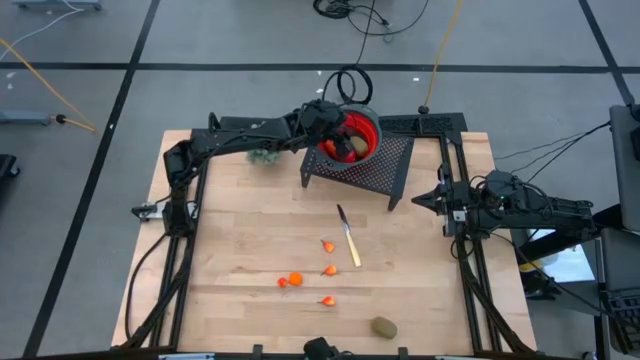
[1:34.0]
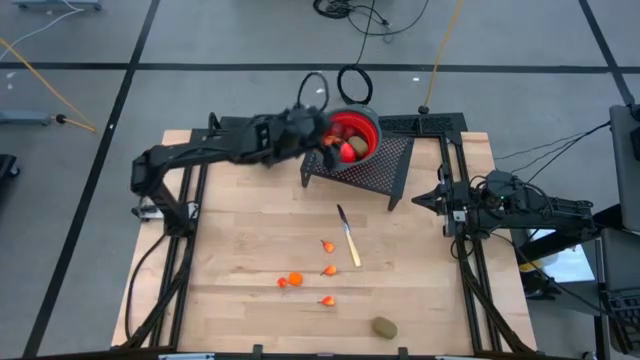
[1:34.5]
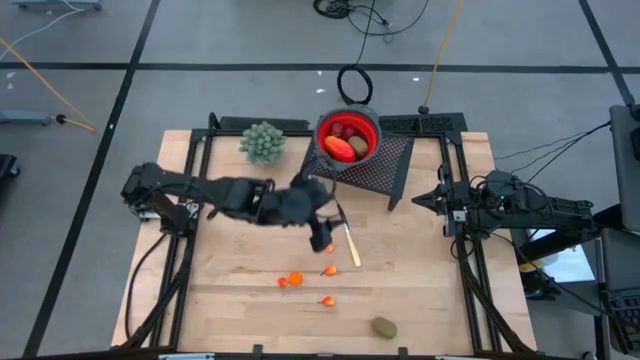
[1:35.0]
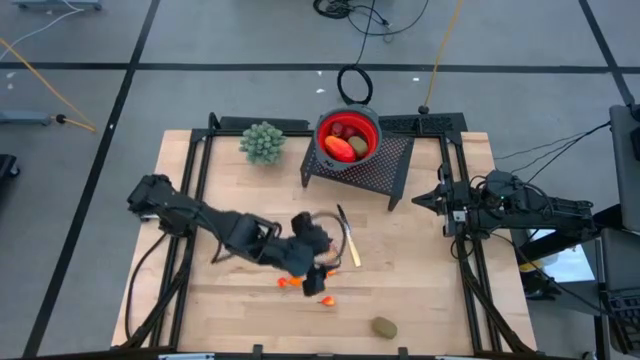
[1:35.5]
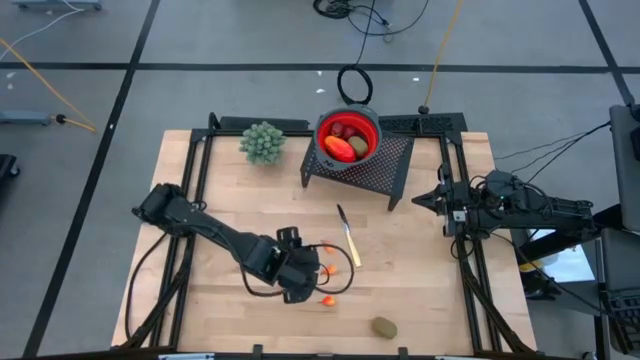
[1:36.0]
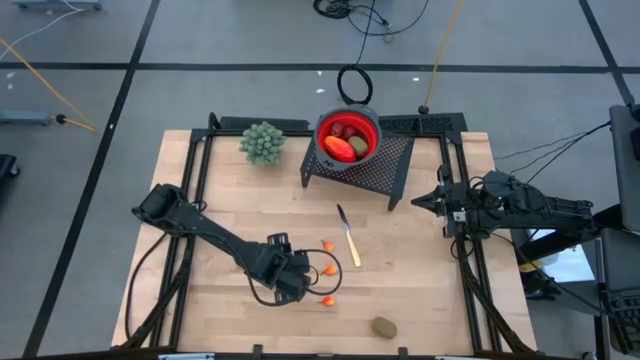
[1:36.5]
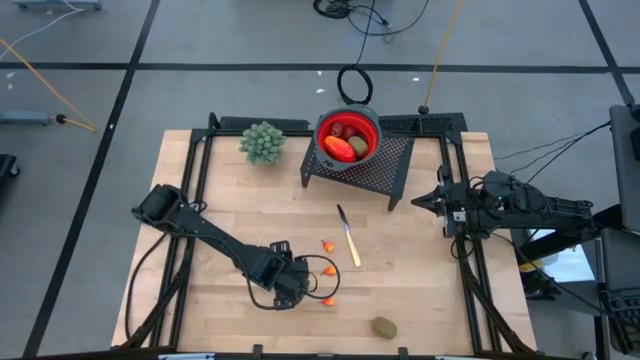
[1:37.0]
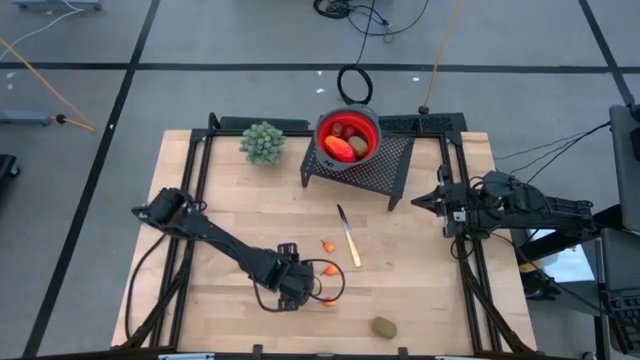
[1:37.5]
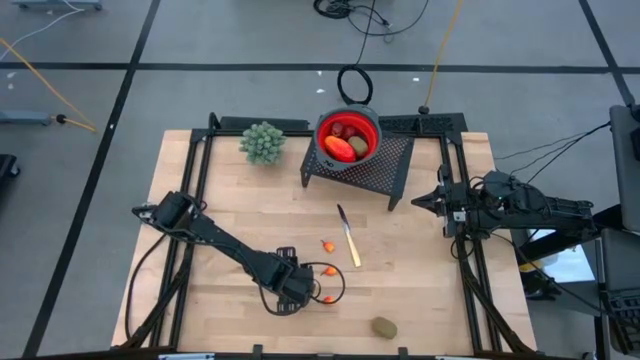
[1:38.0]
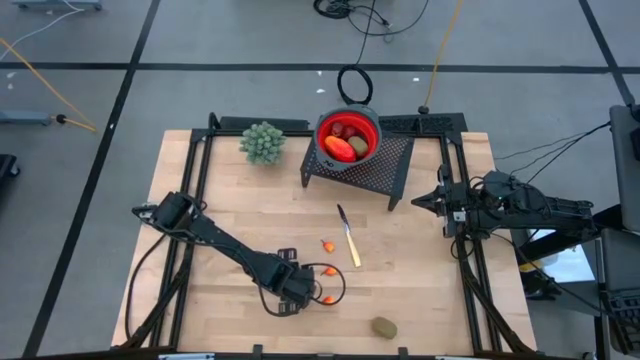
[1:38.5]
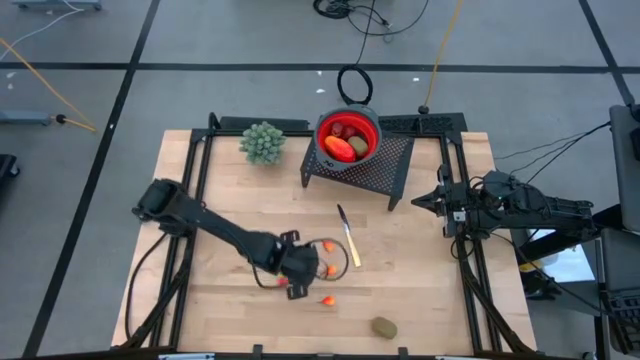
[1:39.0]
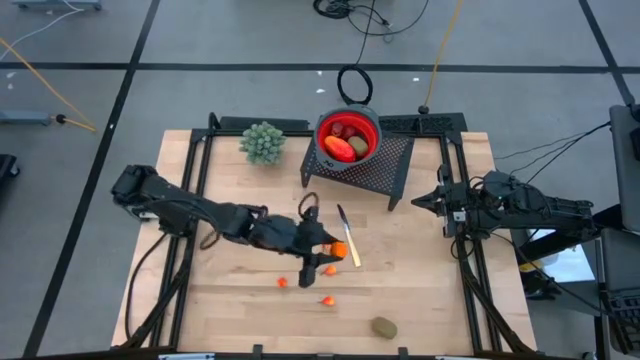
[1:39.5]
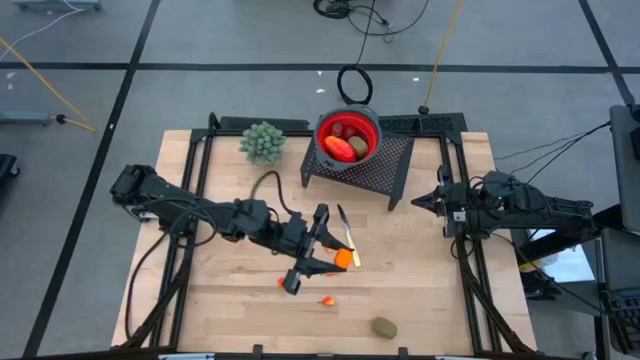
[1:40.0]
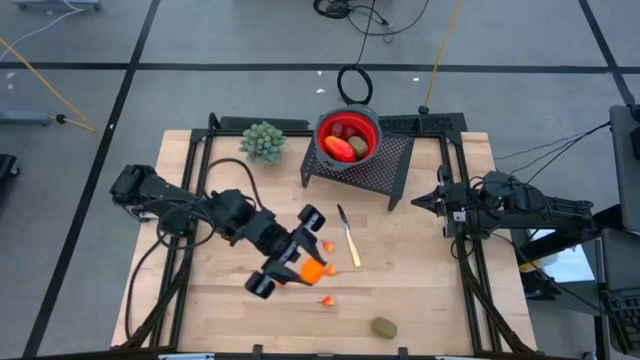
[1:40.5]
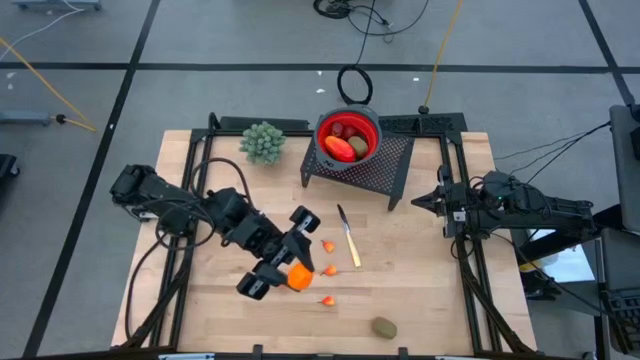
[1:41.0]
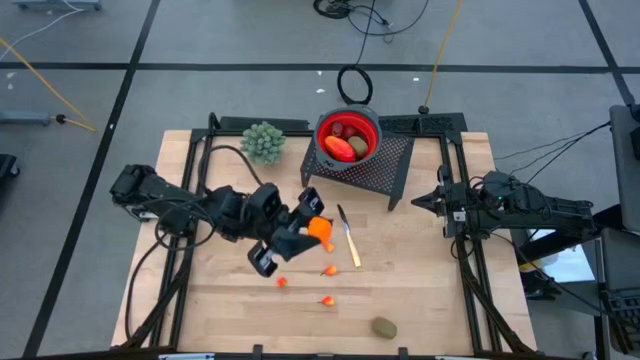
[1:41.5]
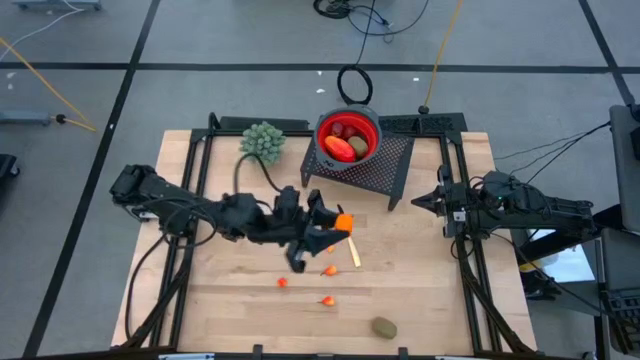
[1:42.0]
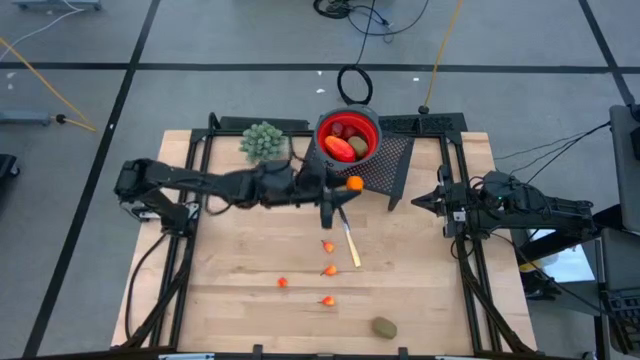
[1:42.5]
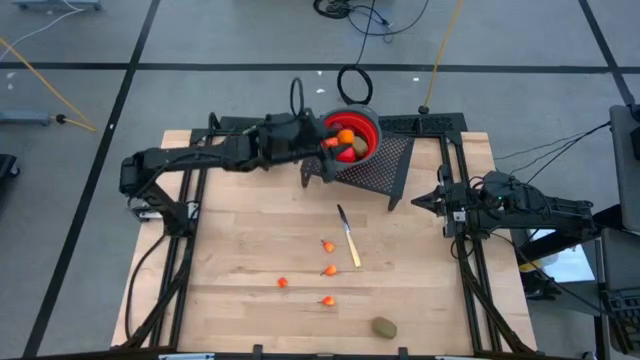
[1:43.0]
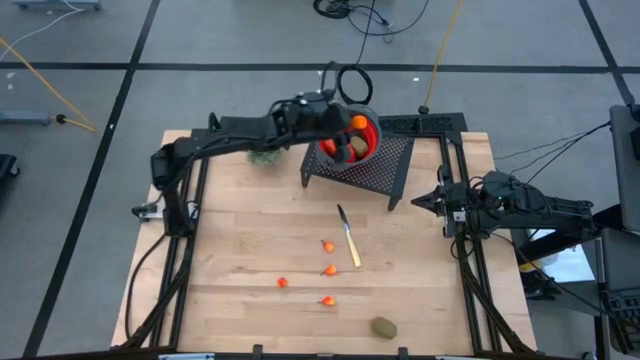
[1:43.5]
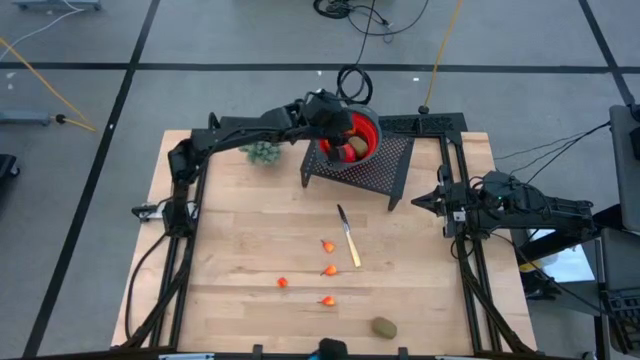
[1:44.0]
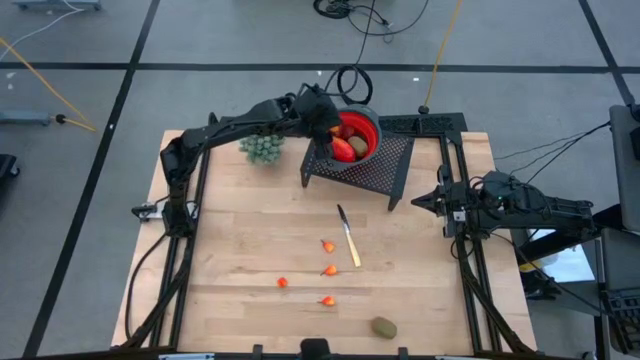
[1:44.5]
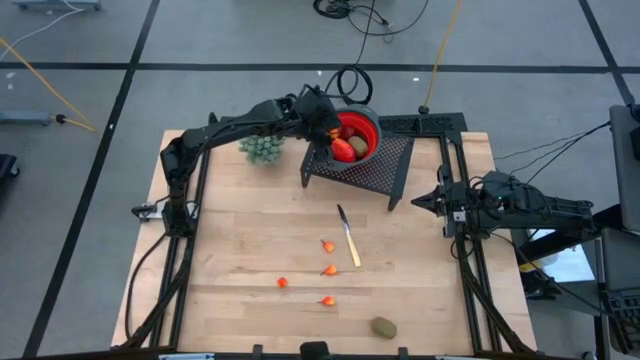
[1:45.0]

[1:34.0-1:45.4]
Task: Pick & Place Fruit
Put the orange into the red strainer bowl on the shelf

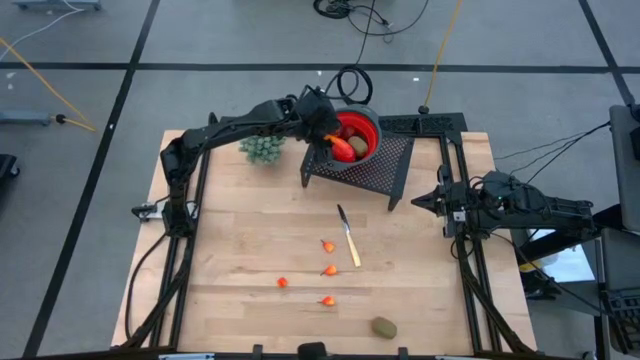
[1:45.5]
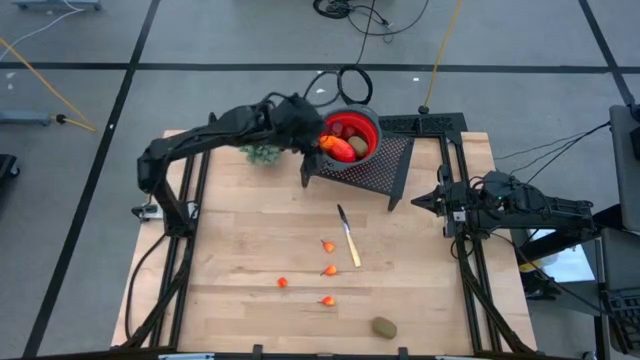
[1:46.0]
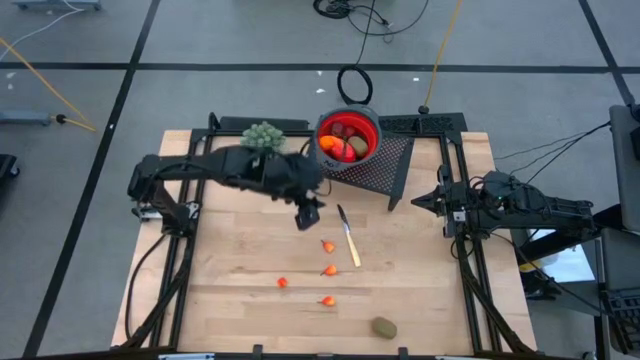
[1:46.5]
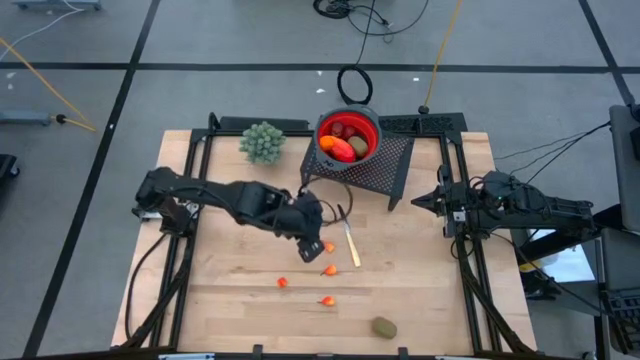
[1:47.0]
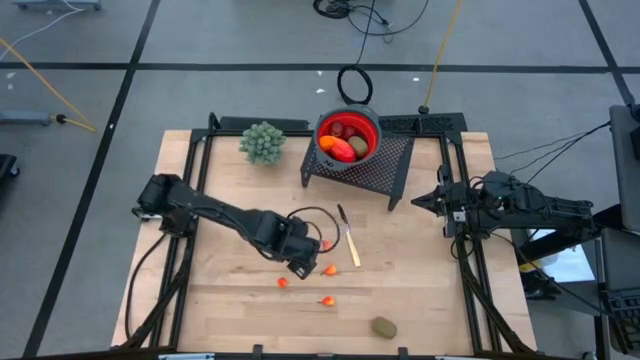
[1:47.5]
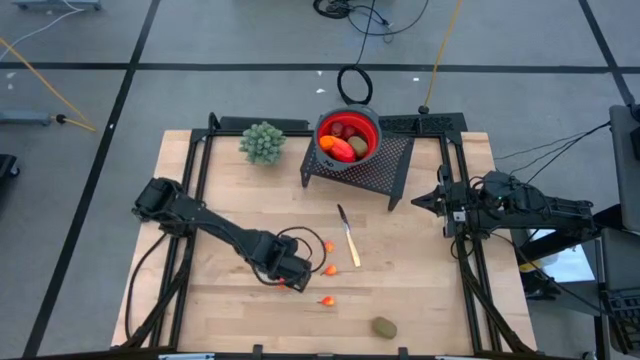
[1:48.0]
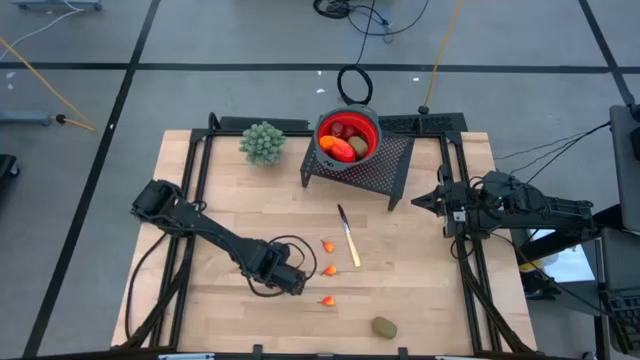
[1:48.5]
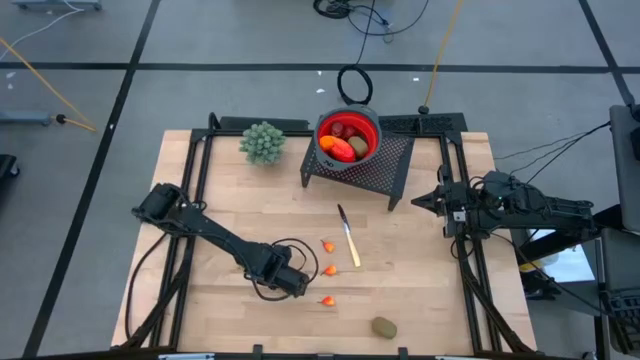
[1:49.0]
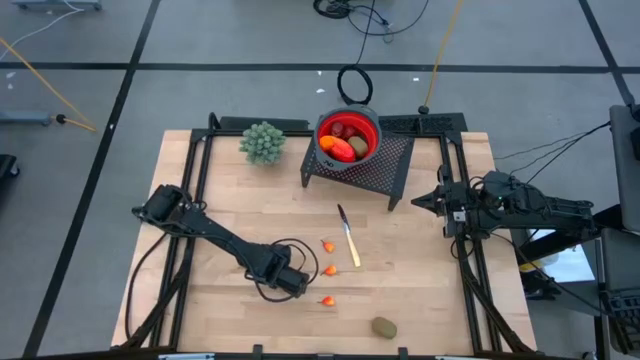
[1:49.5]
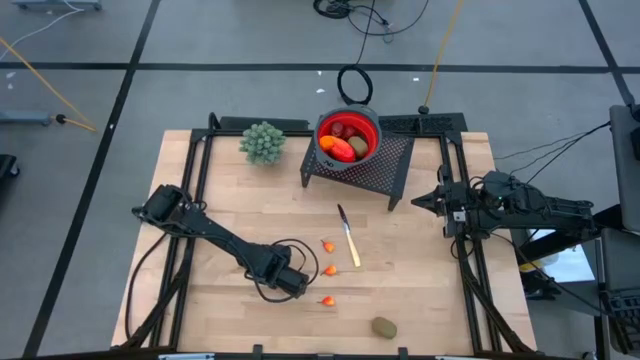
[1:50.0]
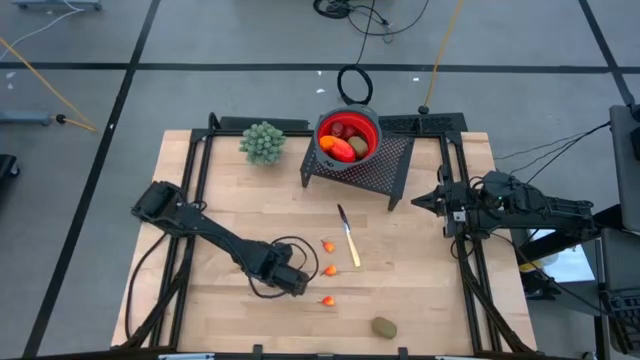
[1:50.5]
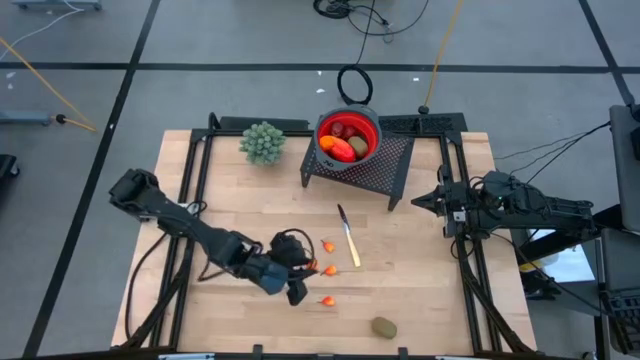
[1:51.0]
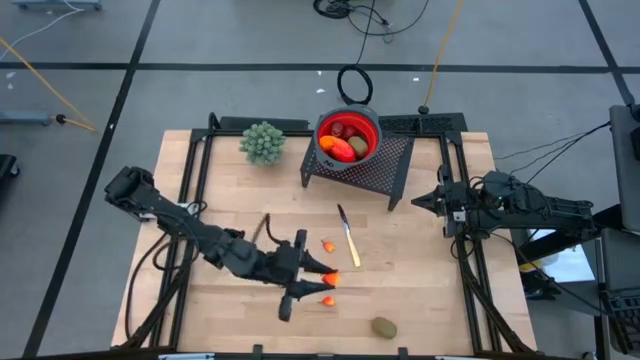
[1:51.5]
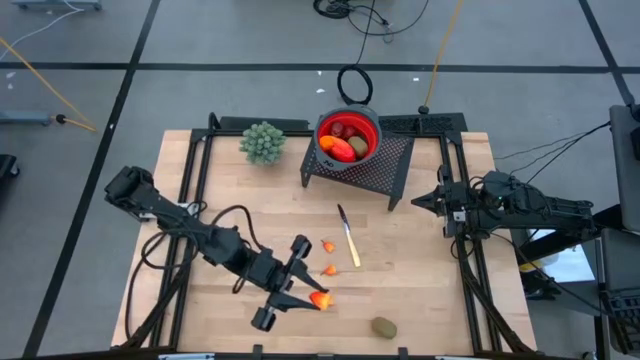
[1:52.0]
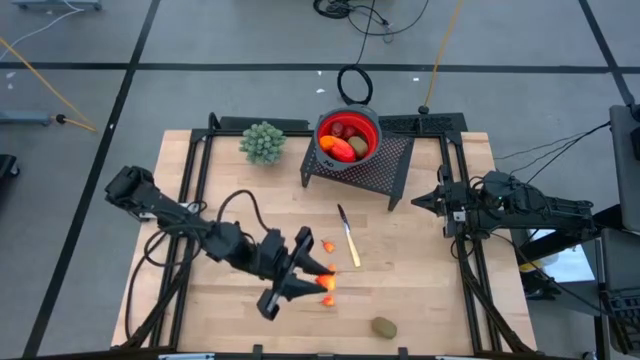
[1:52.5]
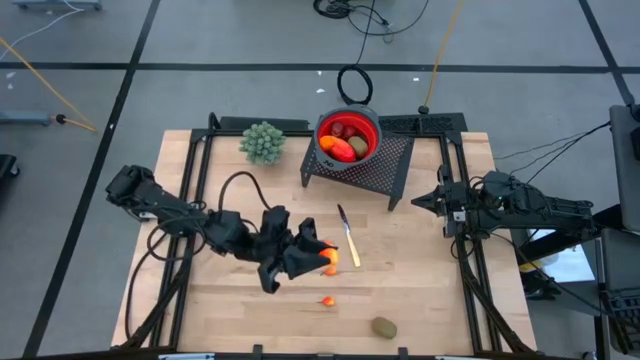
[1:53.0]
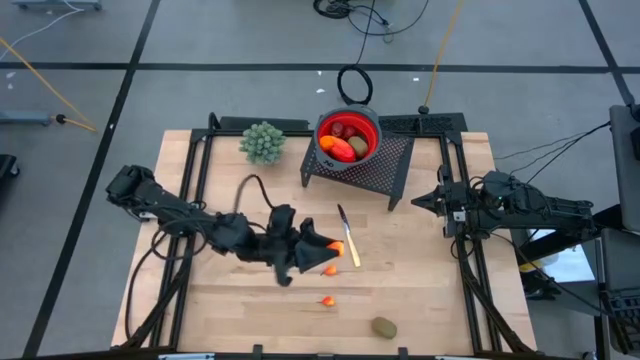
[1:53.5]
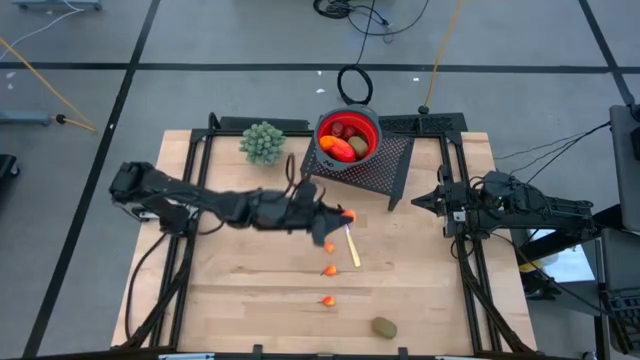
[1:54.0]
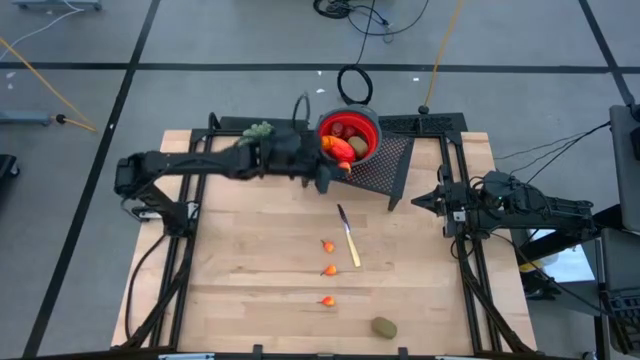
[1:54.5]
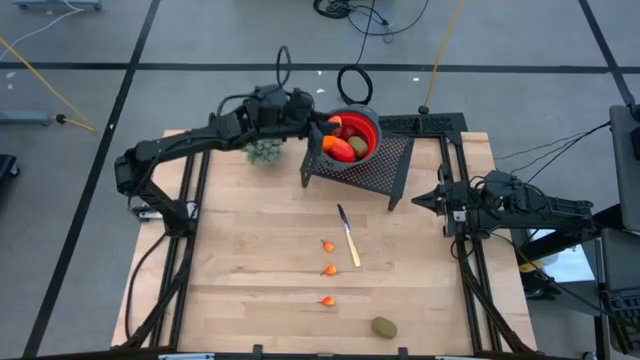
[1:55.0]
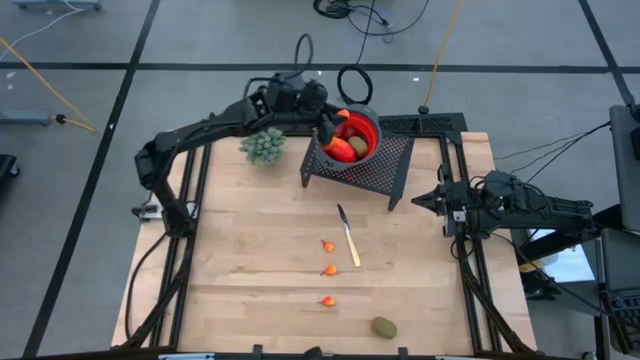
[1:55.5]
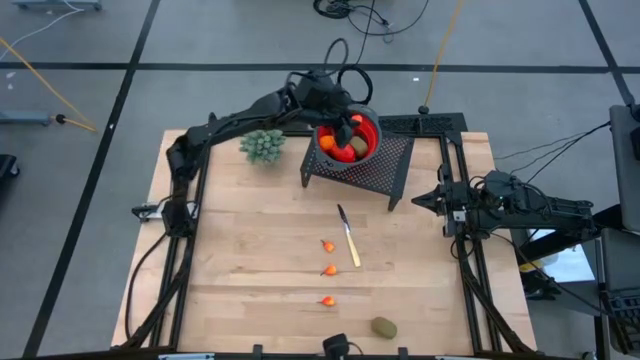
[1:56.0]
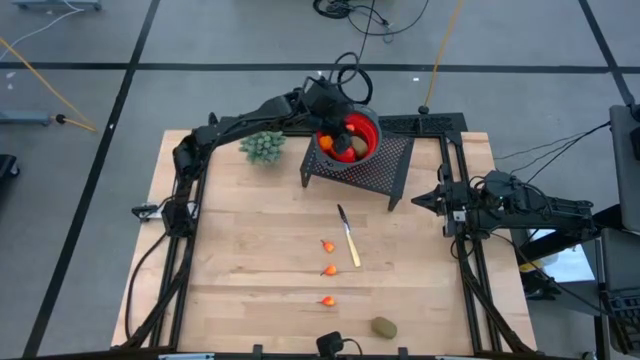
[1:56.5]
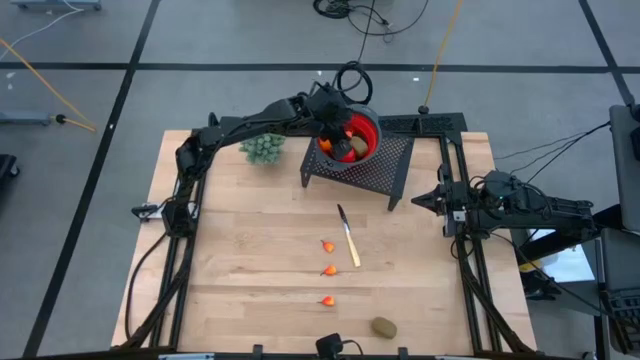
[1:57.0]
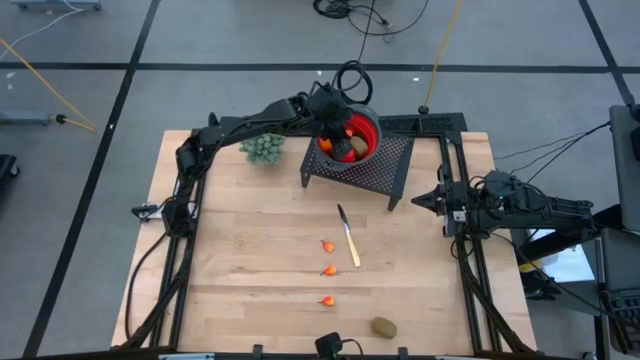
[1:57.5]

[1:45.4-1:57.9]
Put the orange pear into the red strainer bowl on the shelf
